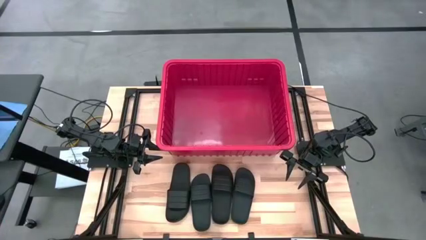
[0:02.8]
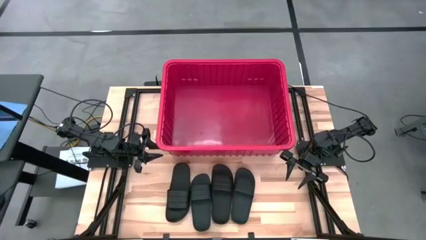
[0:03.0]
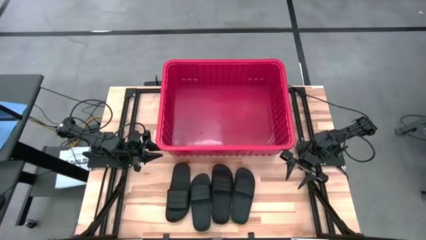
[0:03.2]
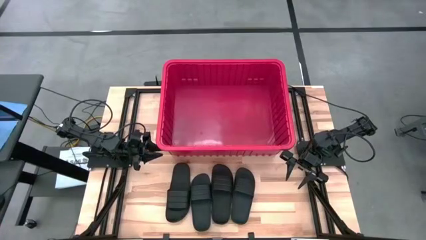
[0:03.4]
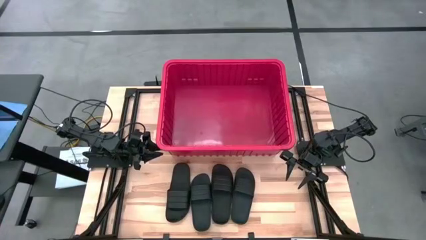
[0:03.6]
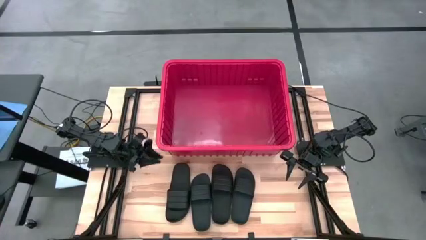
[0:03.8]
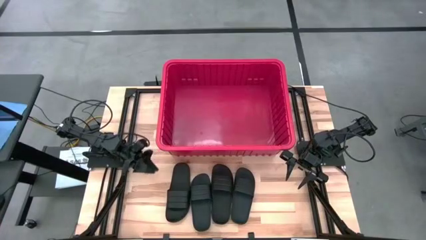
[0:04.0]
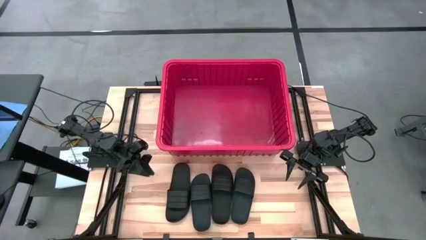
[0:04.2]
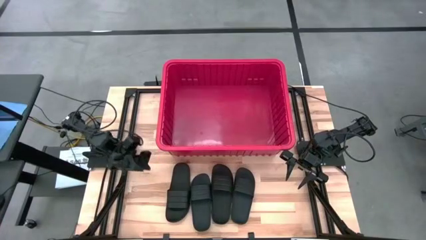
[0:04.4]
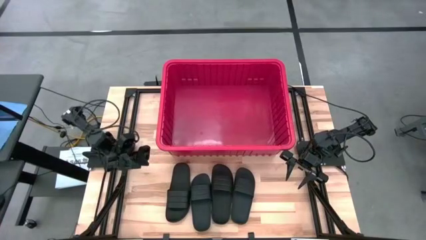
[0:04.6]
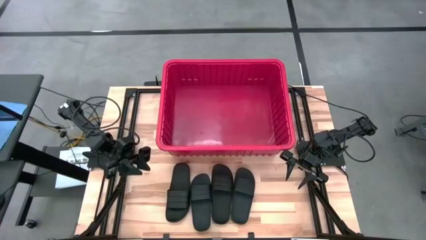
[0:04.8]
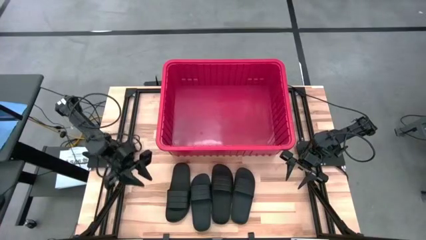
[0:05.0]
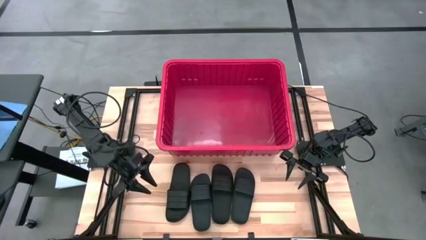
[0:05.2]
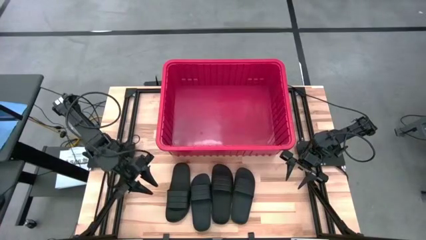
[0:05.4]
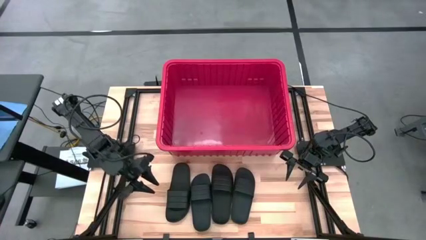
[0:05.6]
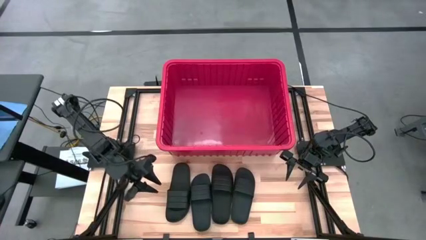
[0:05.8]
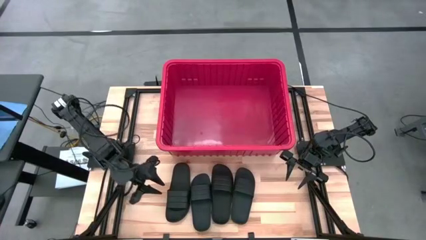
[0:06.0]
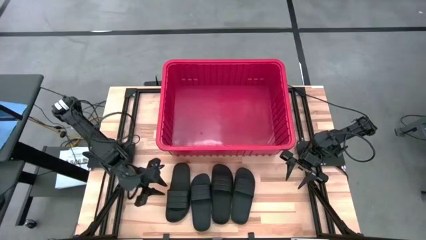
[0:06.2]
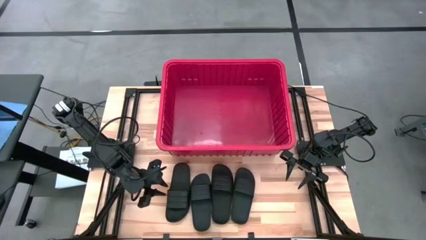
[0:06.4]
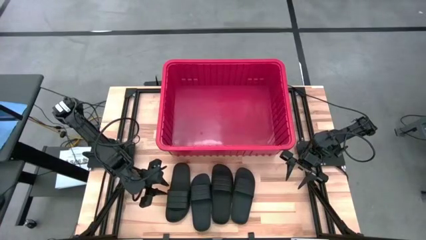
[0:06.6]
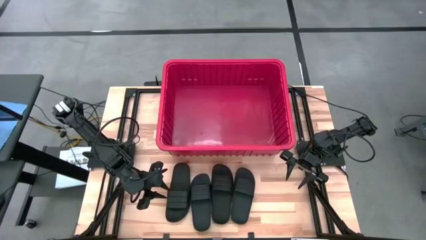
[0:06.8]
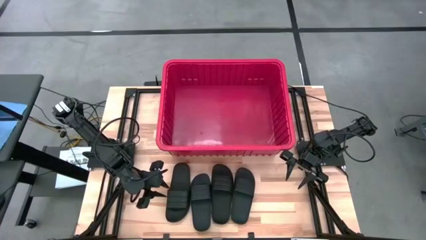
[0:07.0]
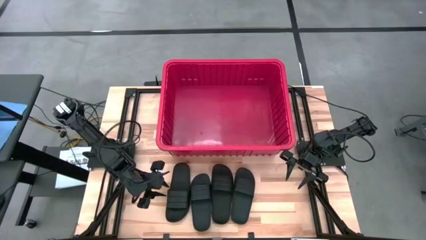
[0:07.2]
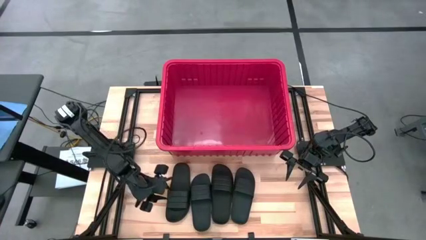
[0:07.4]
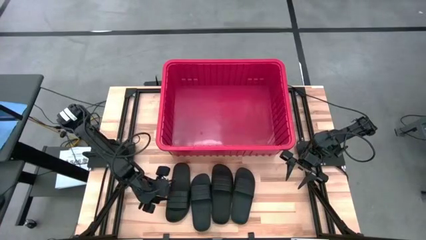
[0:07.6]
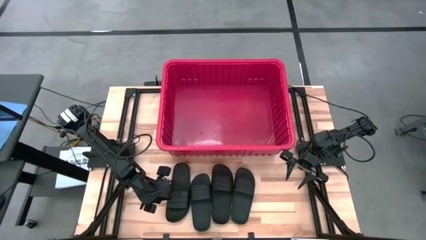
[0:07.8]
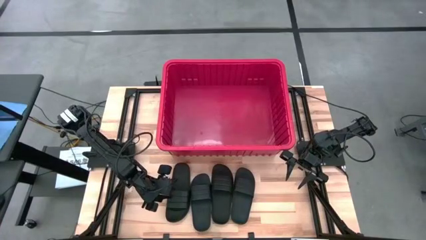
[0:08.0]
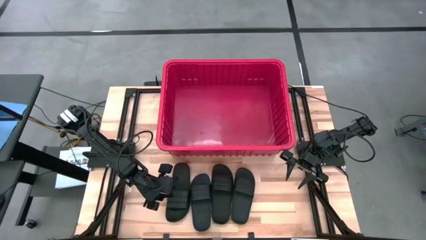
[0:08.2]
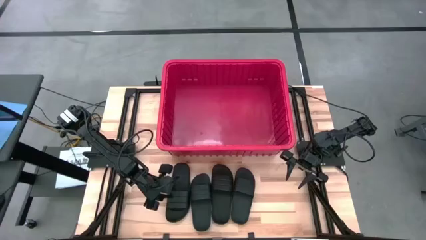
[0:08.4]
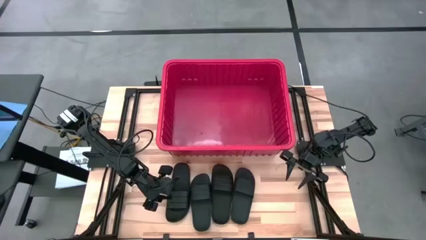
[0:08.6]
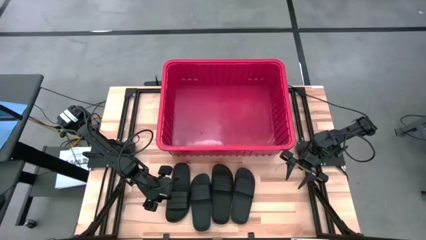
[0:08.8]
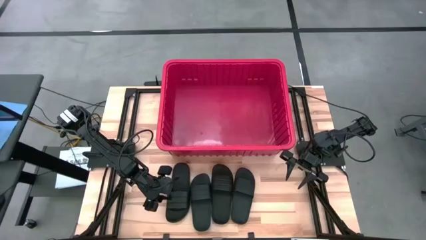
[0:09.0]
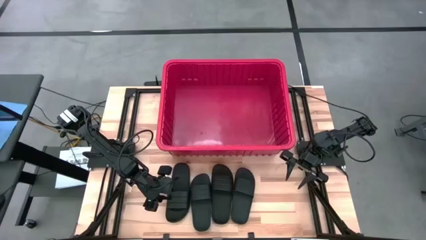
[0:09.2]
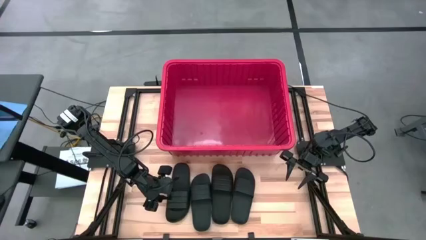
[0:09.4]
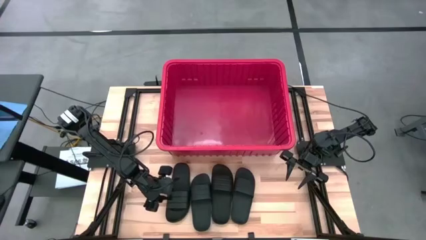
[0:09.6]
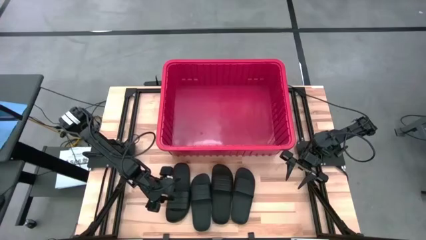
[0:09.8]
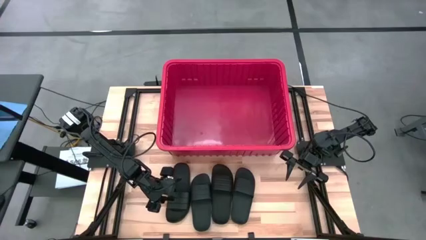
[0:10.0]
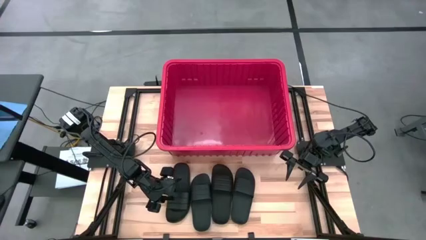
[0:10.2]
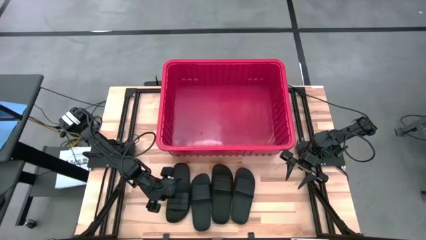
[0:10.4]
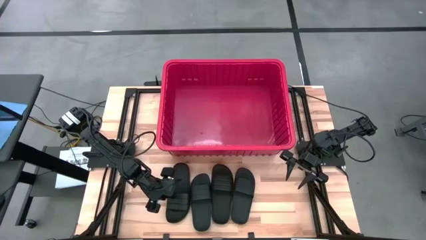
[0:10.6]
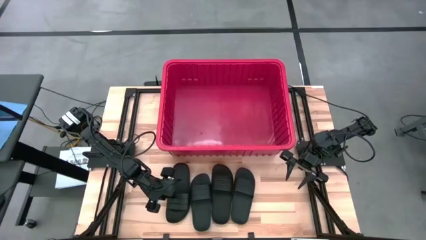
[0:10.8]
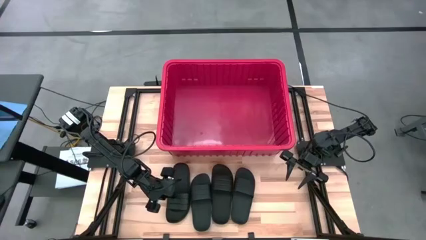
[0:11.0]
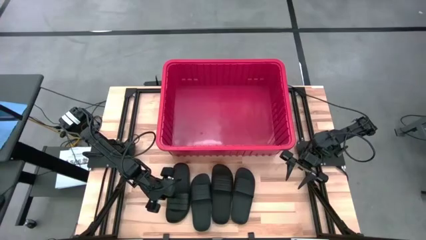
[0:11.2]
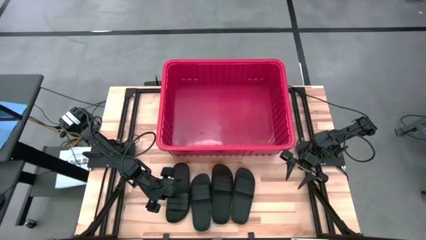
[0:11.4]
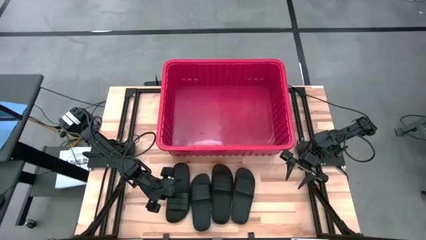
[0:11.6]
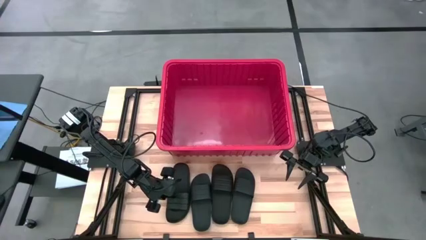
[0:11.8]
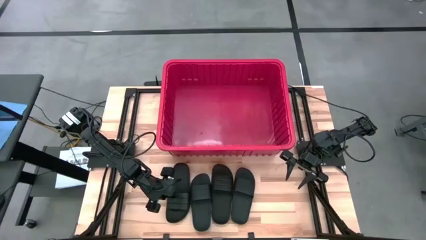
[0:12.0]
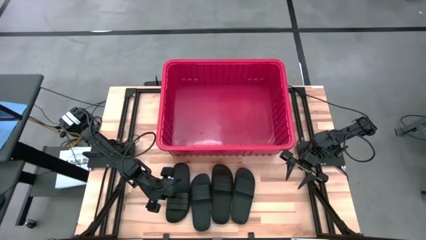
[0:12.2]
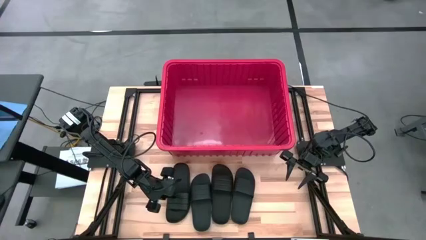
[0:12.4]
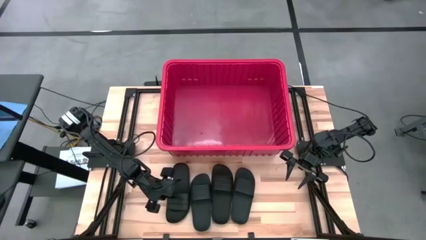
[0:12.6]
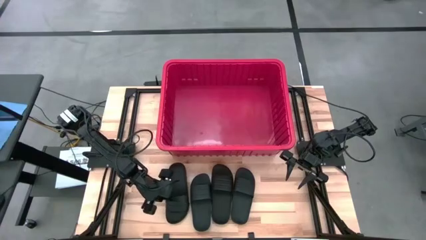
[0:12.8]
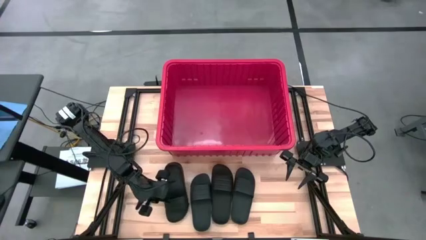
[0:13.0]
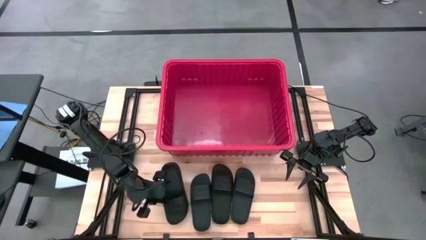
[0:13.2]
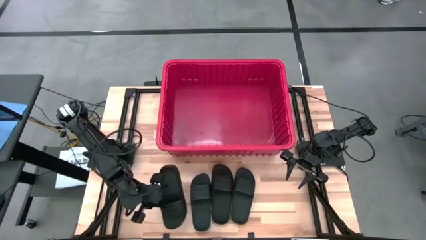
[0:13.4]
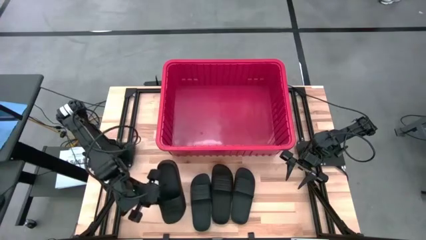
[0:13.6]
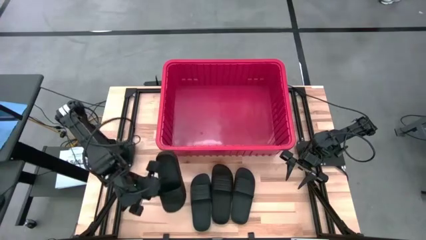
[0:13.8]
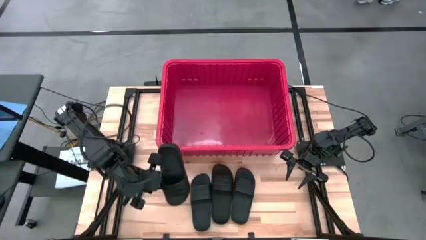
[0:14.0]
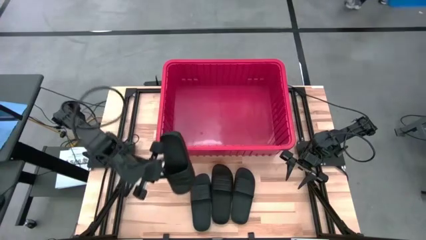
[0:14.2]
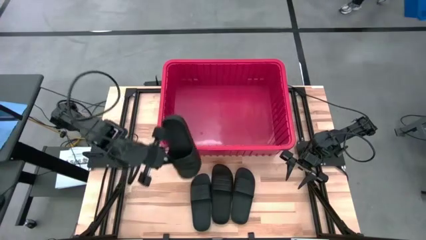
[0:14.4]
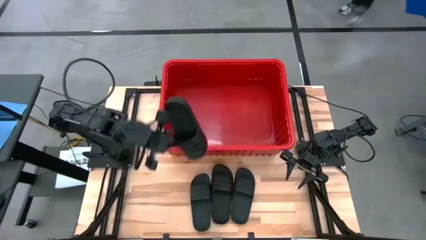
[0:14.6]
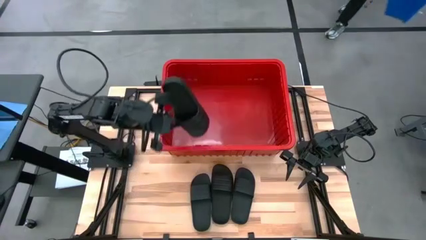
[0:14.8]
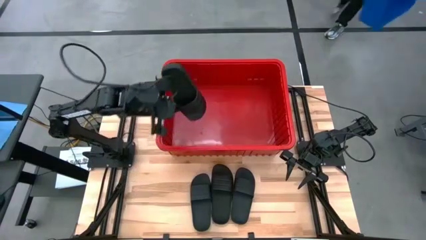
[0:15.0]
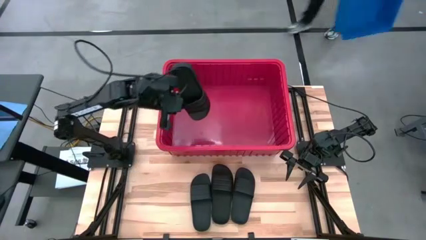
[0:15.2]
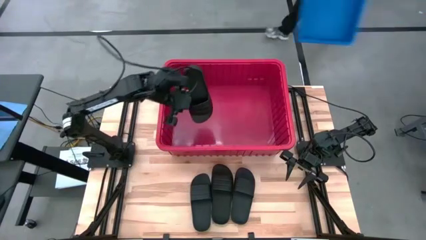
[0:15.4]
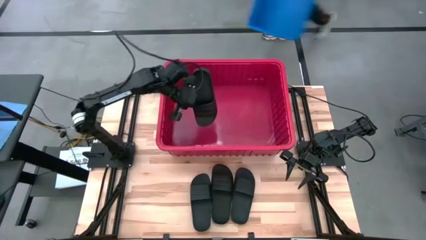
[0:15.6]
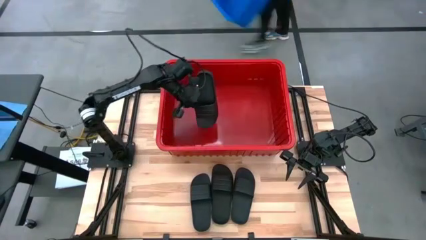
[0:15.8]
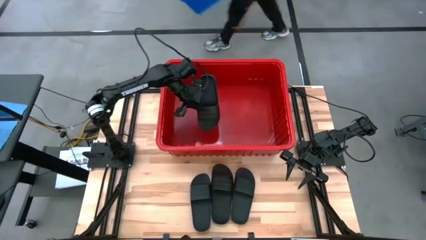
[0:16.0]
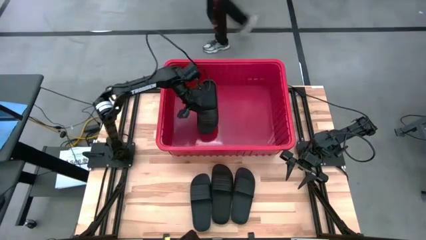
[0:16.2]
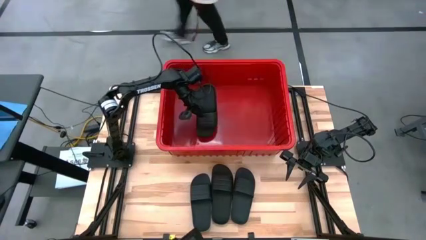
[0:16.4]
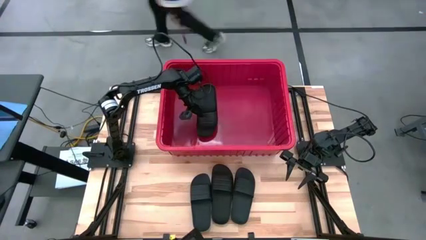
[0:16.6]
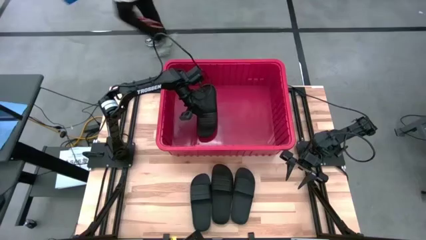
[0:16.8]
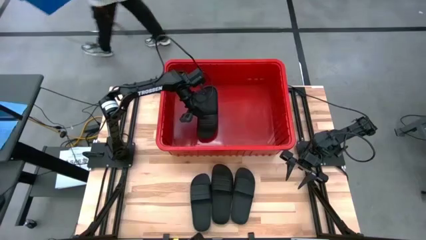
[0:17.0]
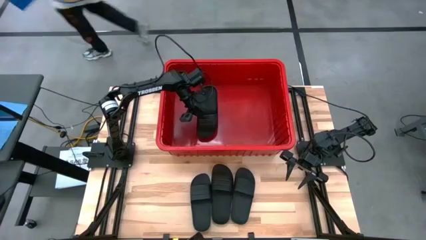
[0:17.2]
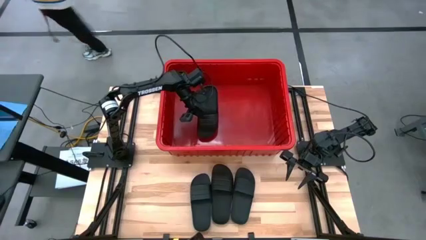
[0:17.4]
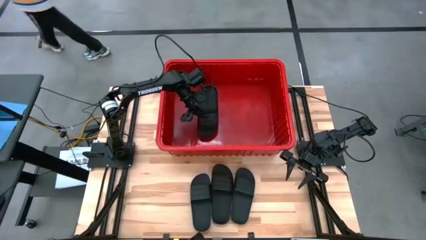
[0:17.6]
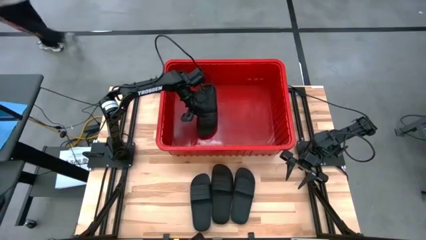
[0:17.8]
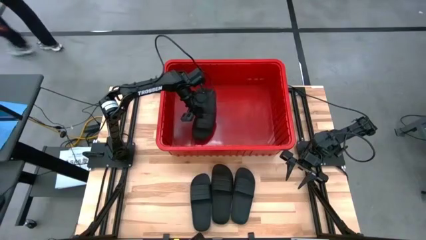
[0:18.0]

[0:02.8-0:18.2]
Task: Pick and place slides into bin
Put the black slide into the red bin
